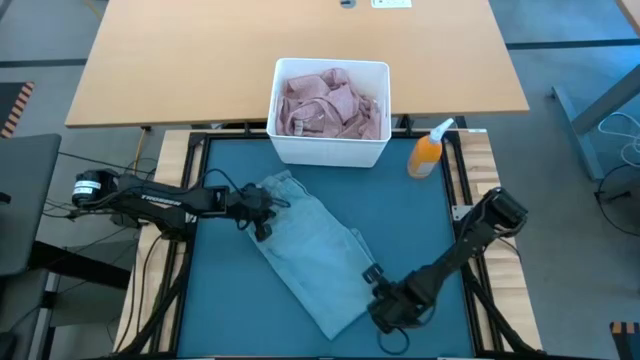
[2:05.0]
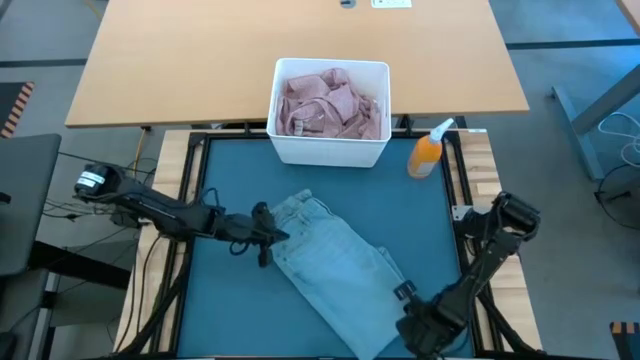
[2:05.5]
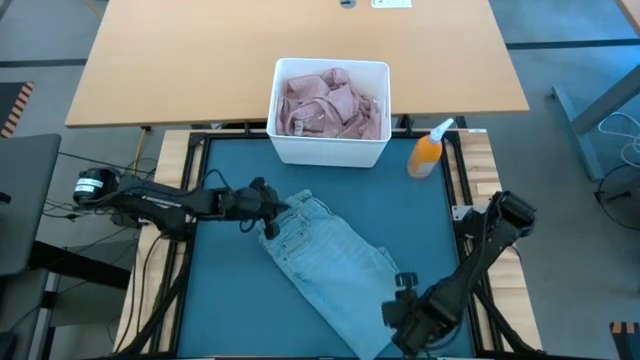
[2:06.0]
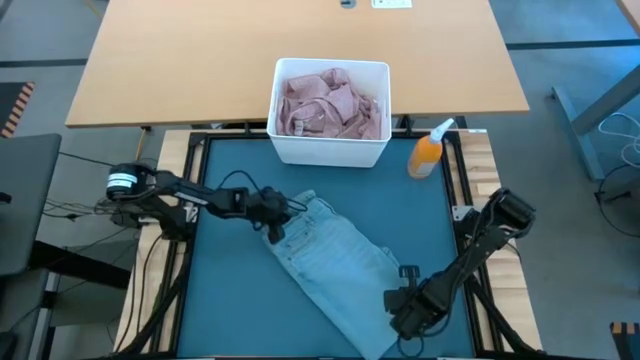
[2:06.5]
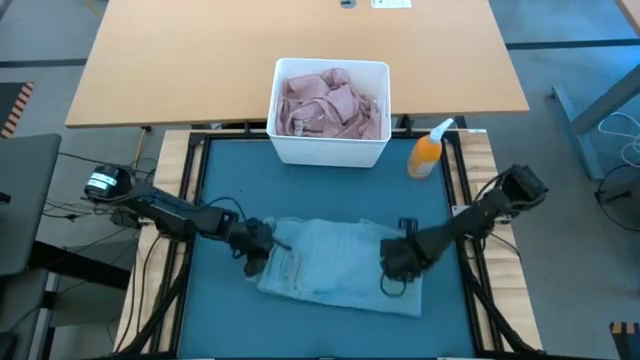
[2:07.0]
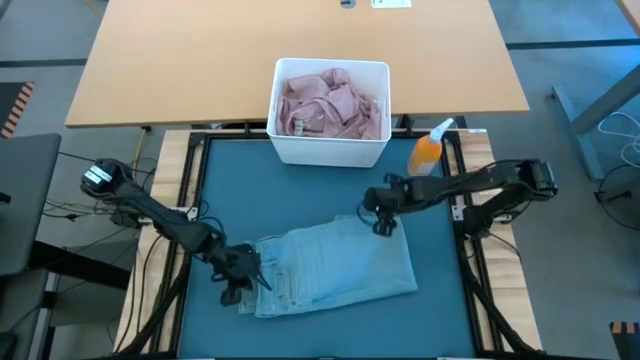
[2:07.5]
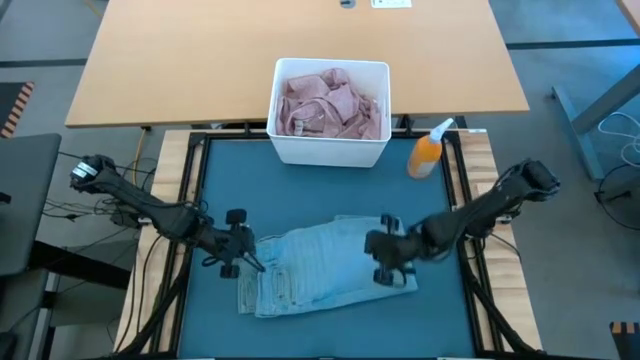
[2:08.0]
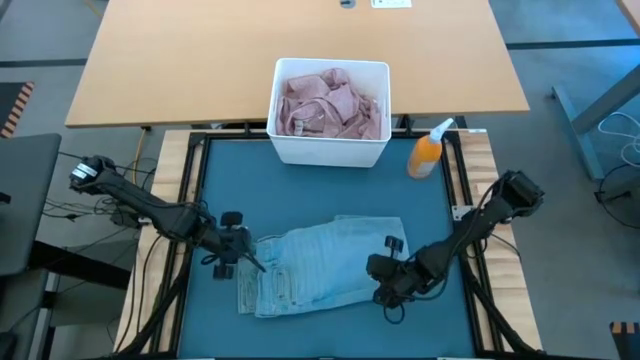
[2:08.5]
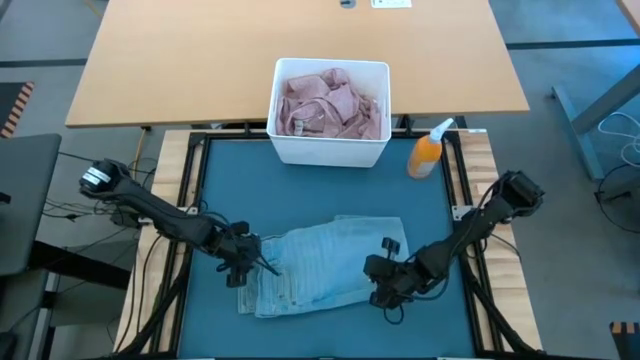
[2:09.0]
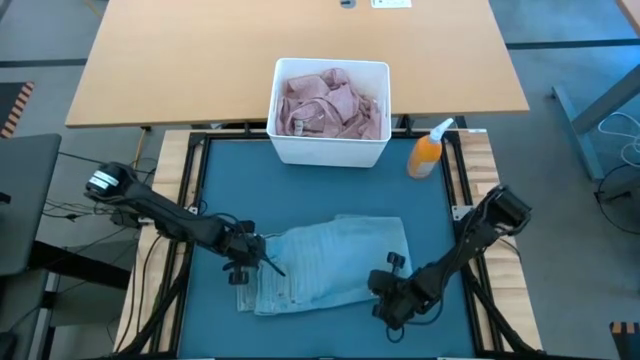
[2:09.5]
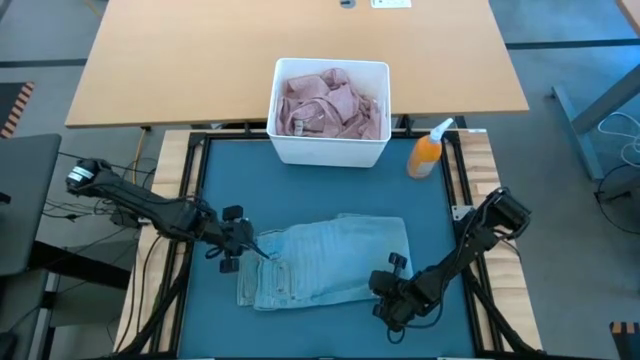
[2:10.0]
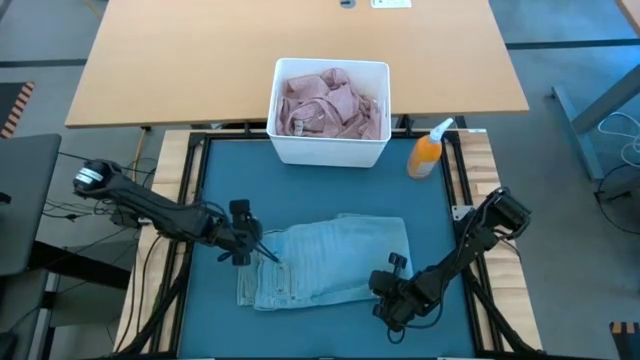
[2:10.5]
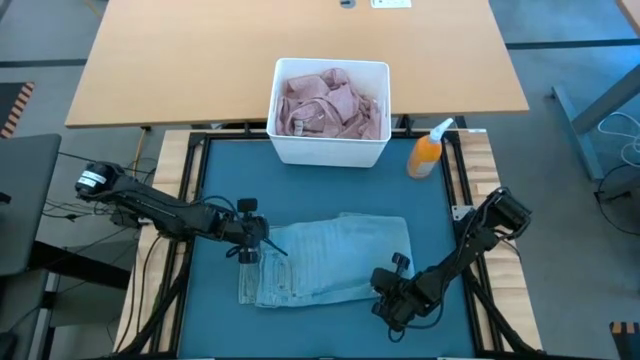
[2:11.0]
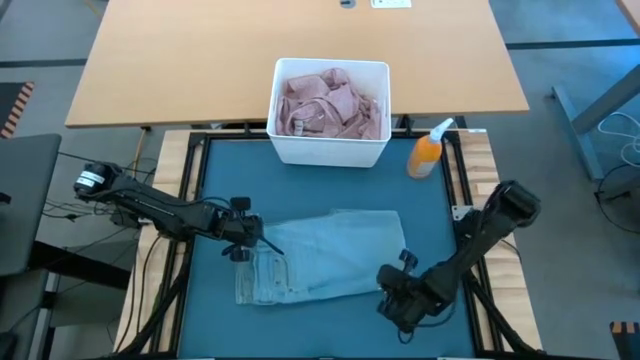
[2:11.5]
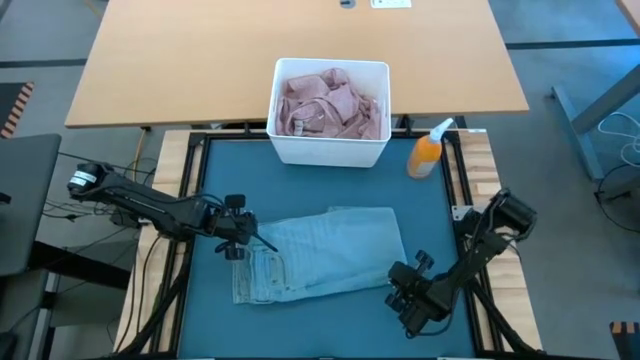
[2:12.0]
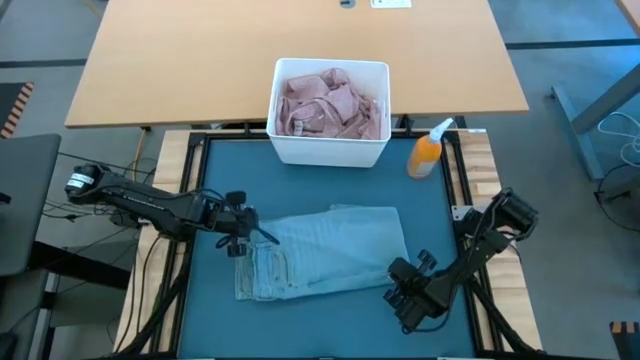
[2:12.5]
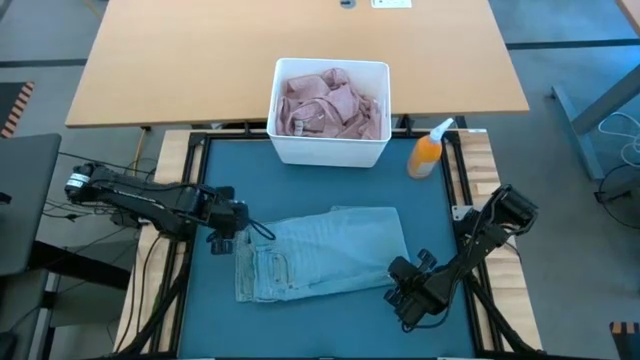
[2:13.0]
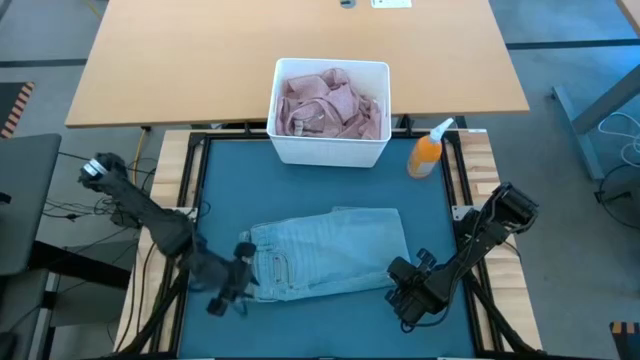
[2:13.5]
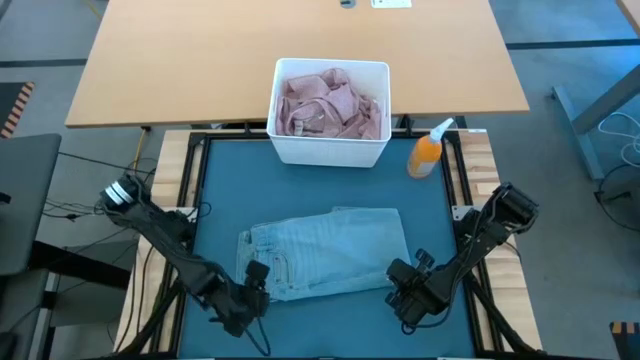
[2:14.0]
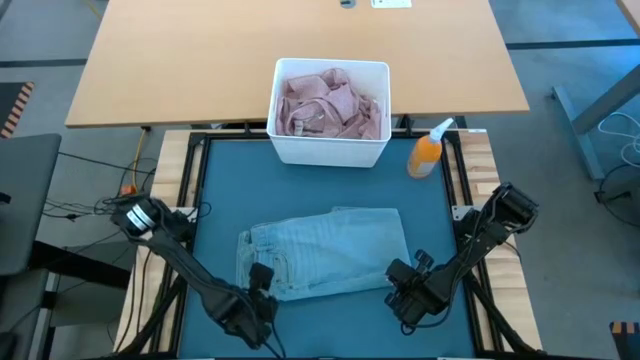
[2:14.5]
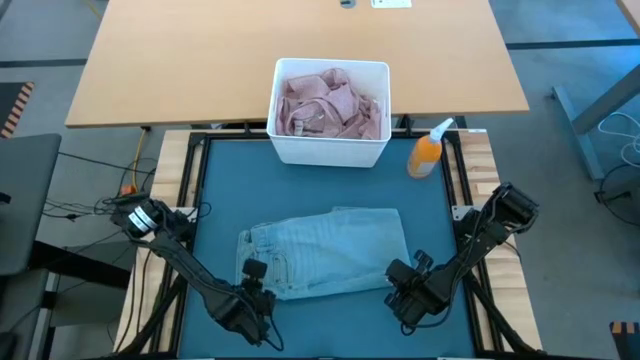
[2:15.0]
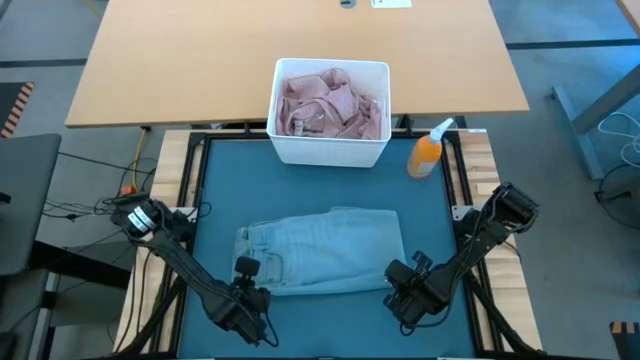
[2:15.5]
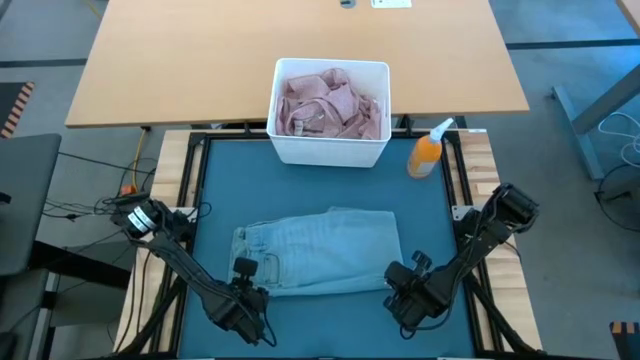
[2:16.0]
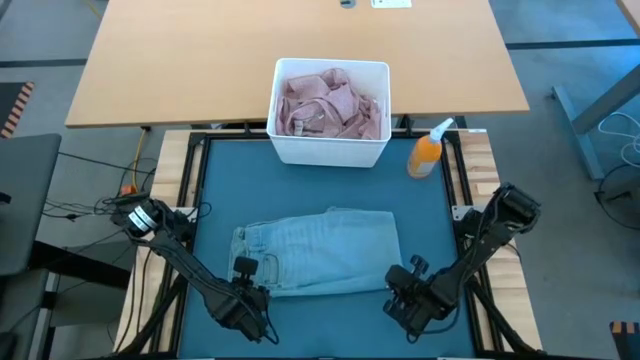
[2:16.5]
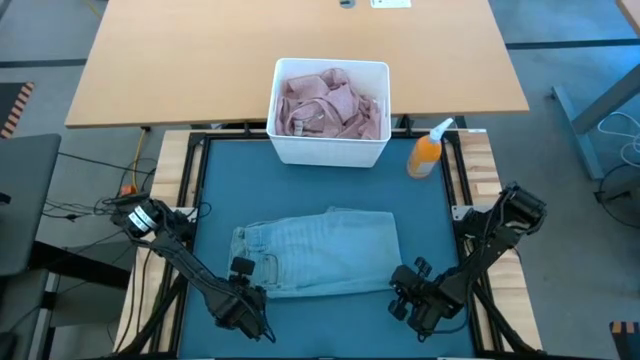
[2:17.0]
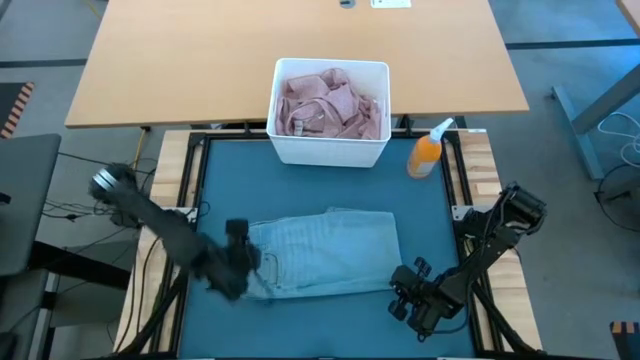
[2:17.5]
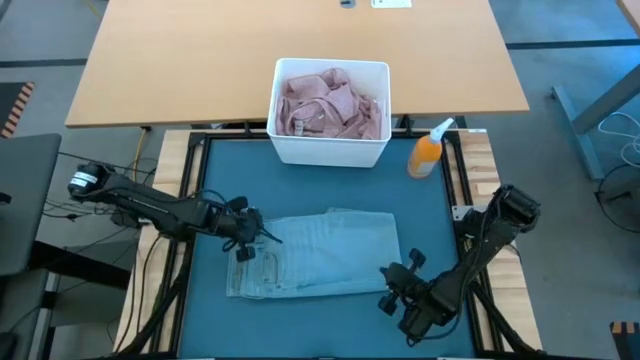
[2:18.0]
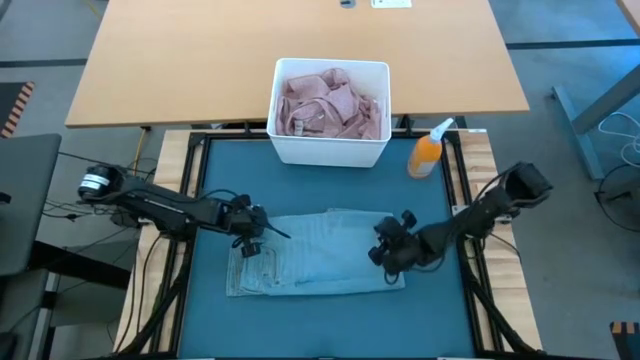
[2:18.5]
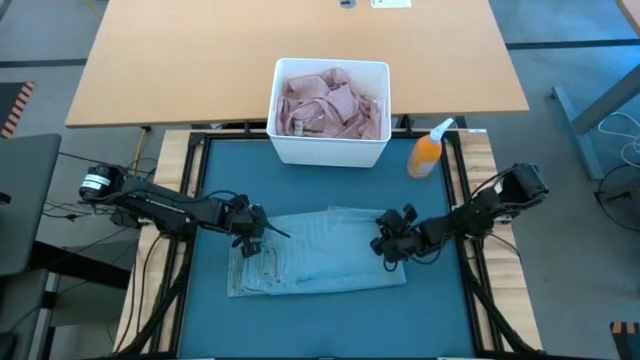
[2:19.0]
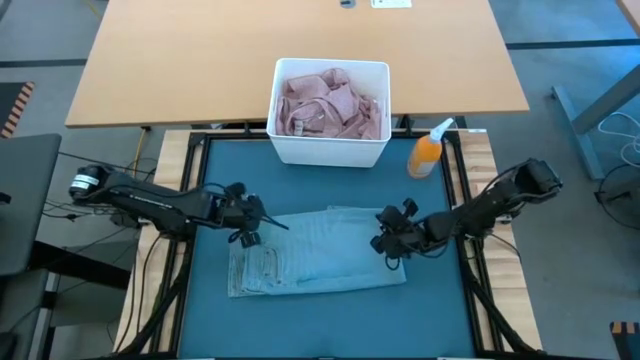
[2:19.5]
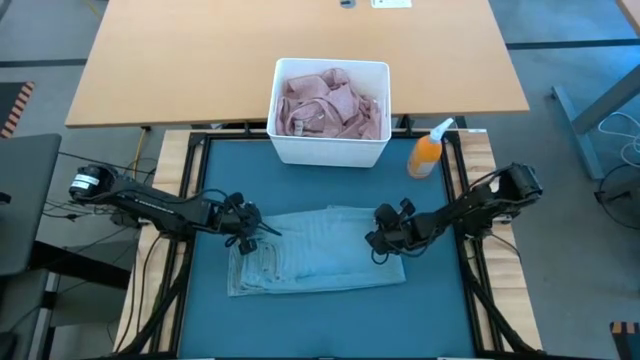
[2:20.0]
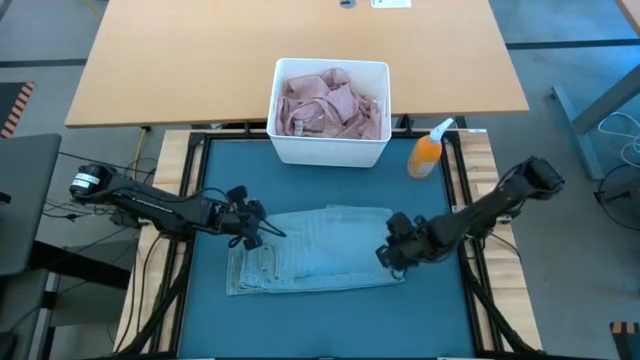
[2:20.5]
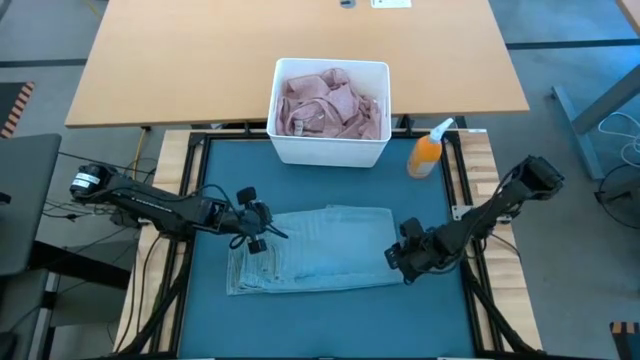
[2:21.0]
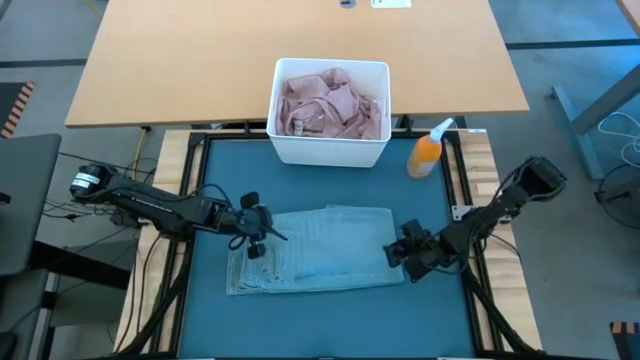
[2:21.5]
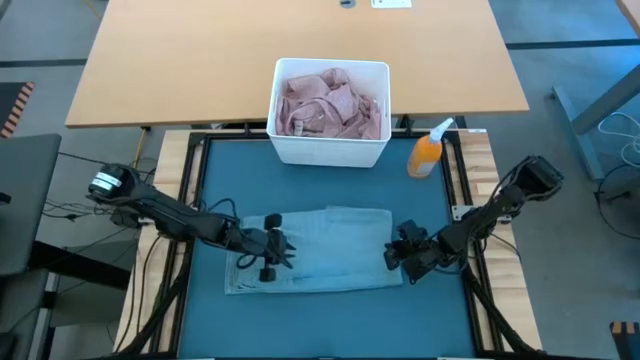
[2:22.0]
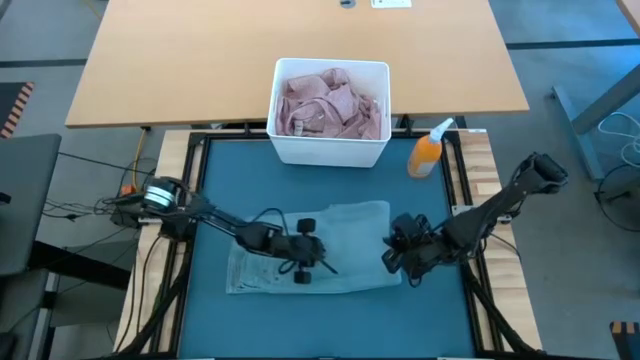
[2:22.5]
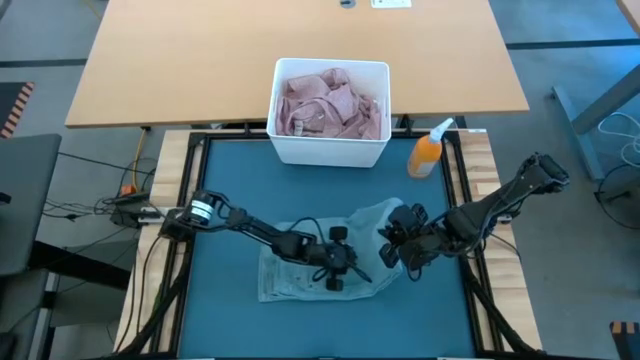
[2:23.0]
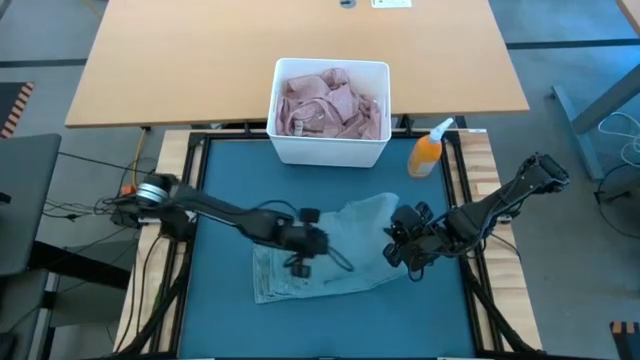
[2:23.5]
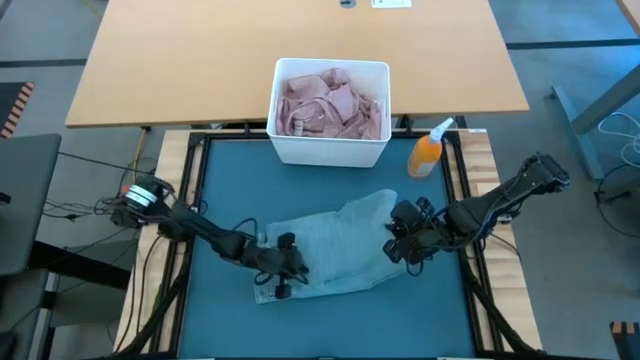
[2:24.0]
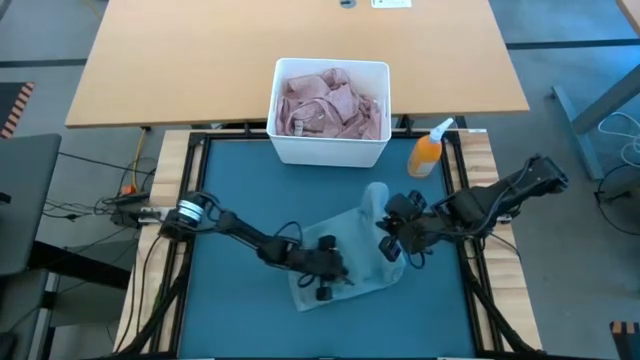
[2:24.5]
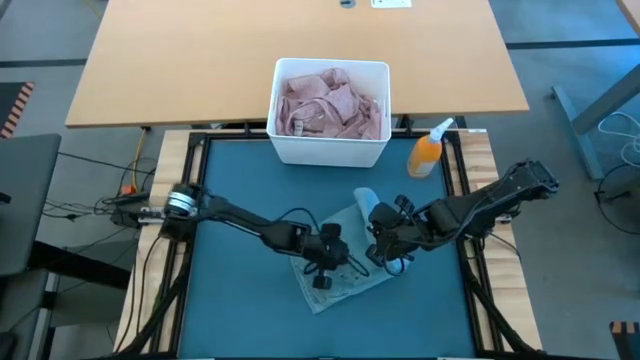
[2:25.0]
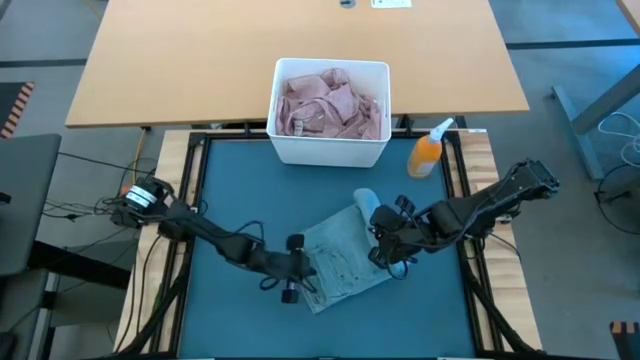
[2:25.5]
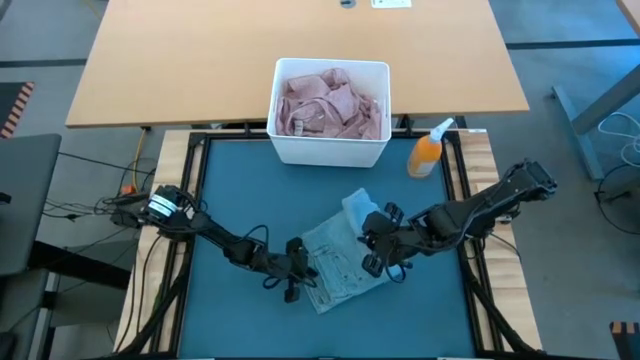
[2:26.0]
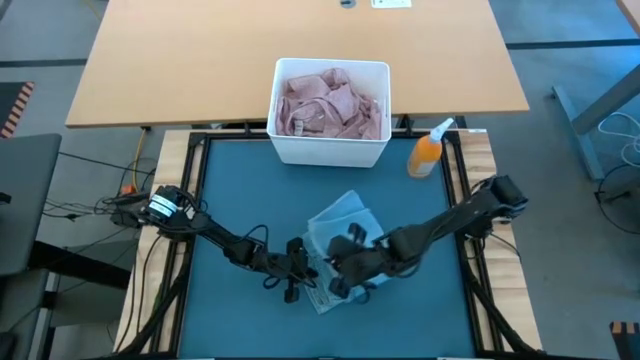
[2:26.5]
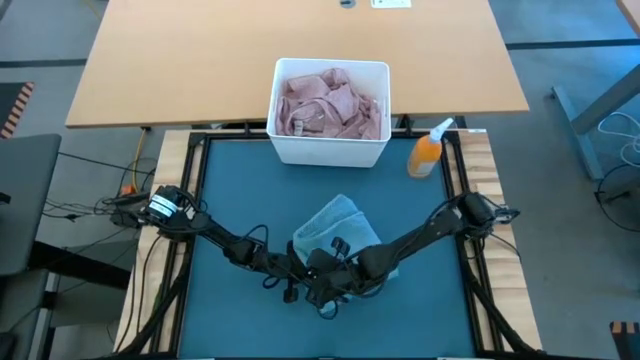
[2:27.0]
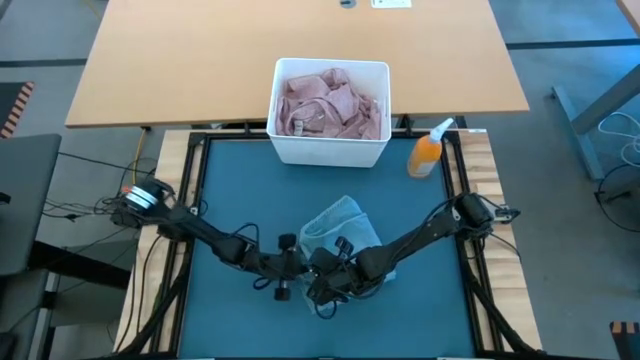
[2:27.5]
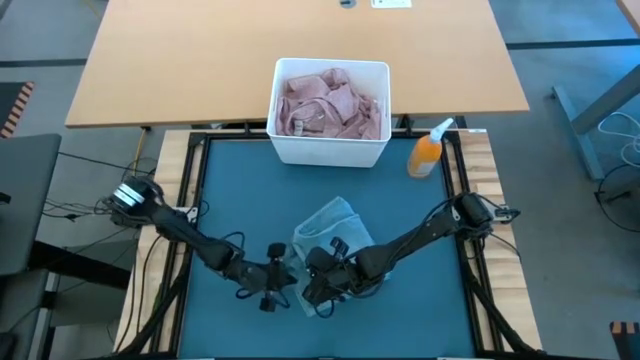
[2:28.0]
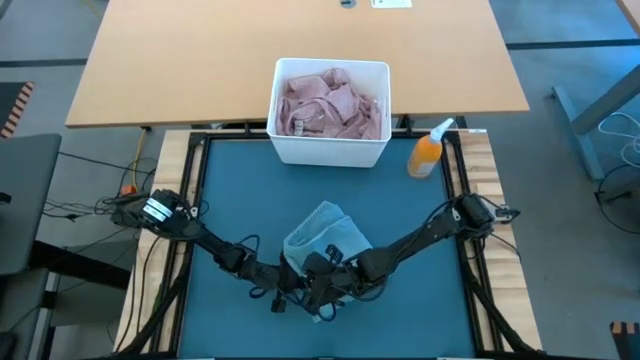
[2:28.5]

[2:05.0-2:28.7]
Task: Fold Laundry from Bin
Fold the blue pants
